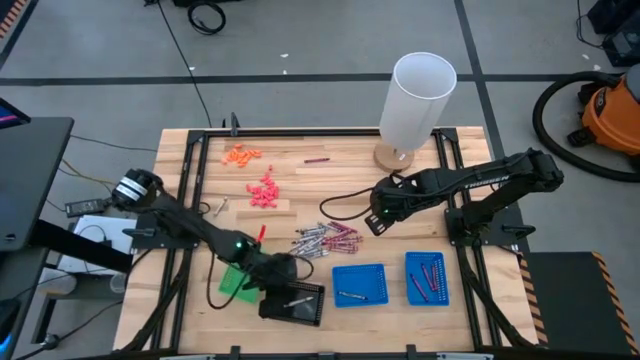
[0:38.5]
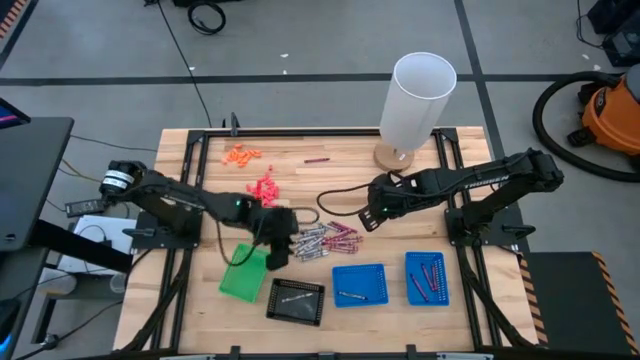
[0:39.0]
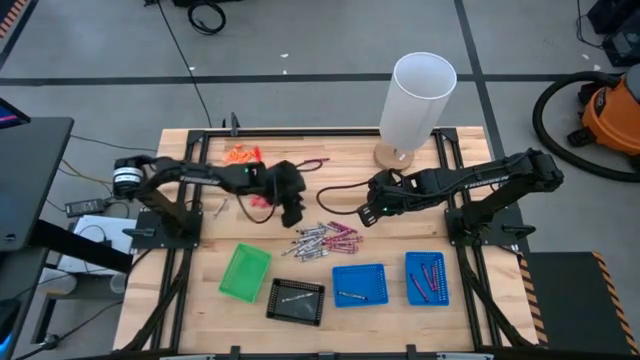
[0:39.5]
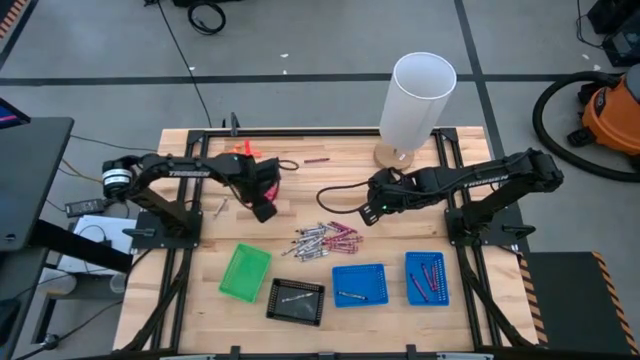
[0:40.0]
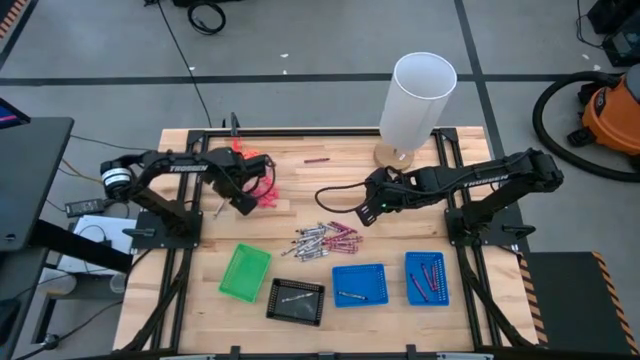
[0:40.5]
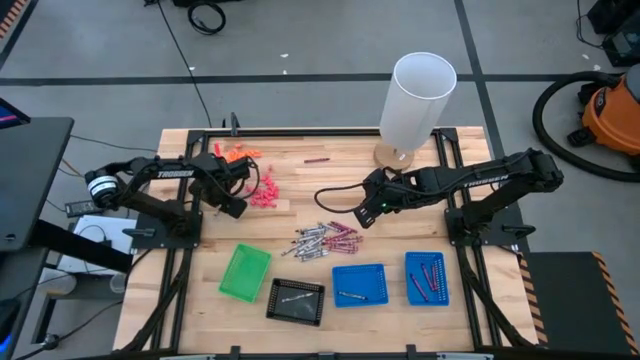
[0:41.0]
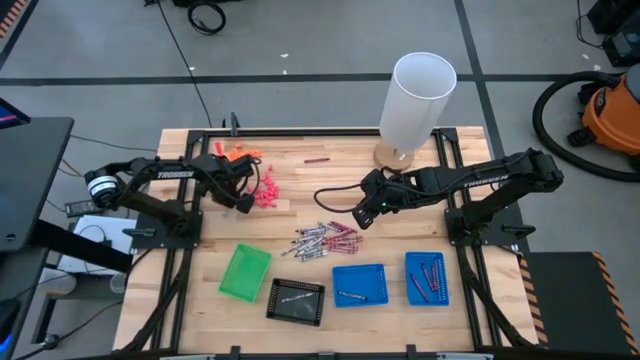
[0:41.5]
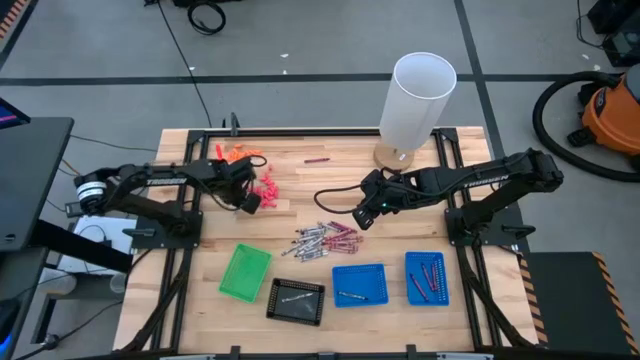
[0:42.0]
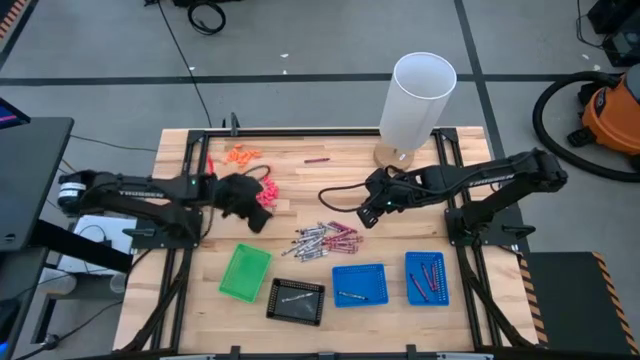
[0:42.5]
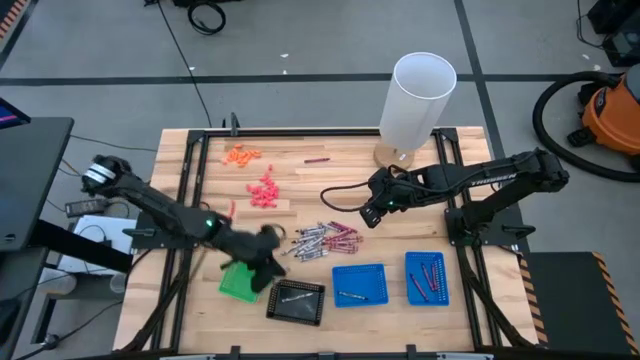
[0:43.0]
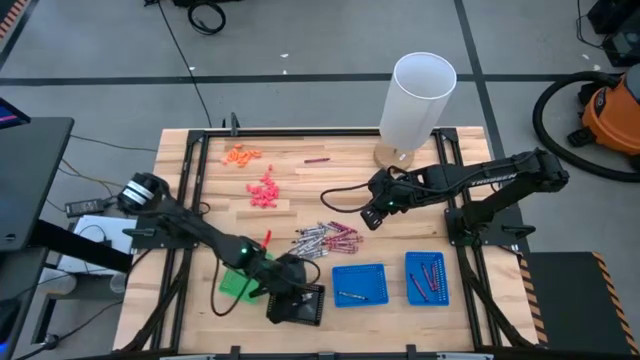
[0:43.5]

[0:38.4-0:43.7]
Task: Sort crayons
Put the white crayon into the black basket

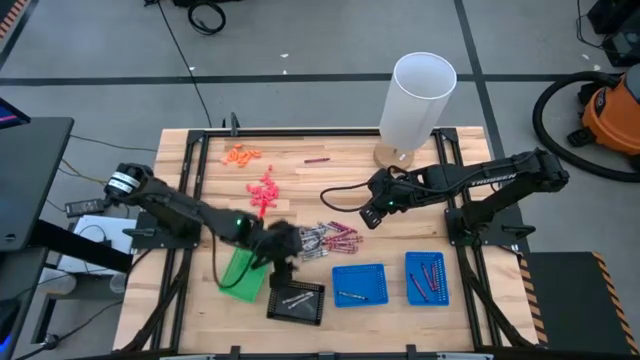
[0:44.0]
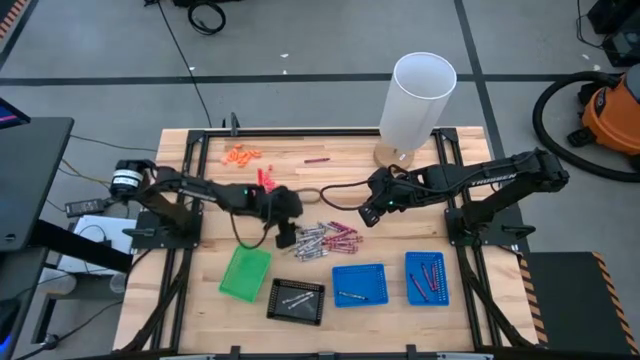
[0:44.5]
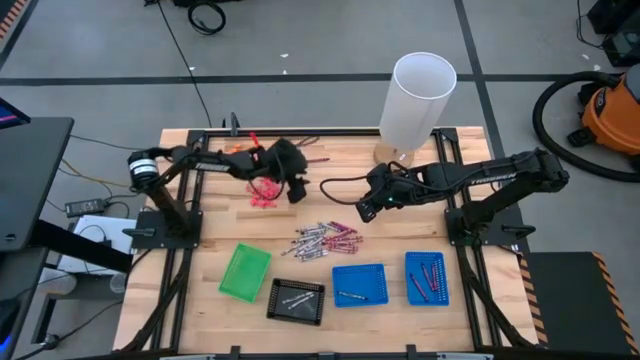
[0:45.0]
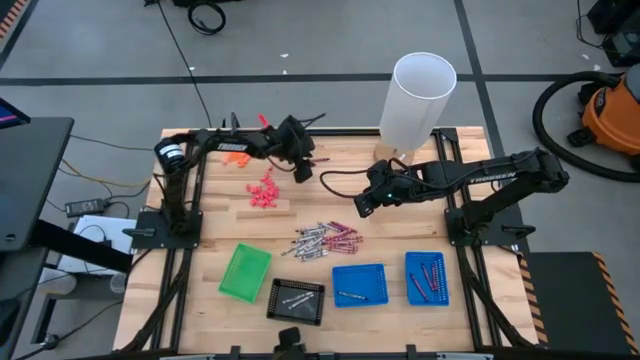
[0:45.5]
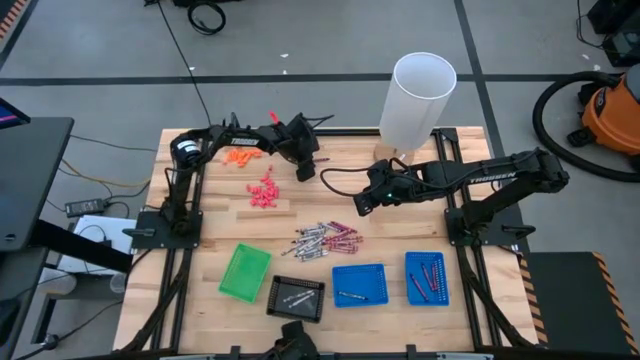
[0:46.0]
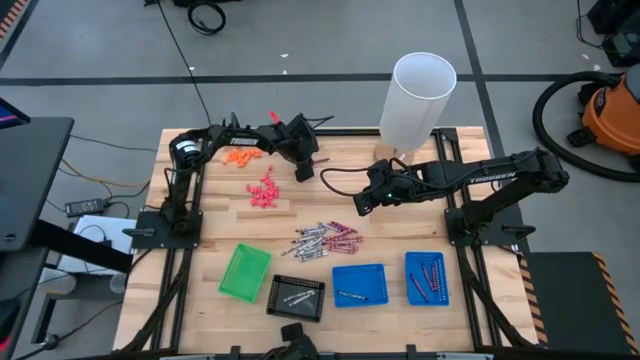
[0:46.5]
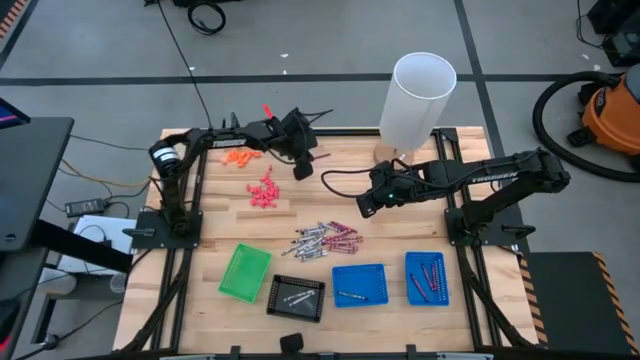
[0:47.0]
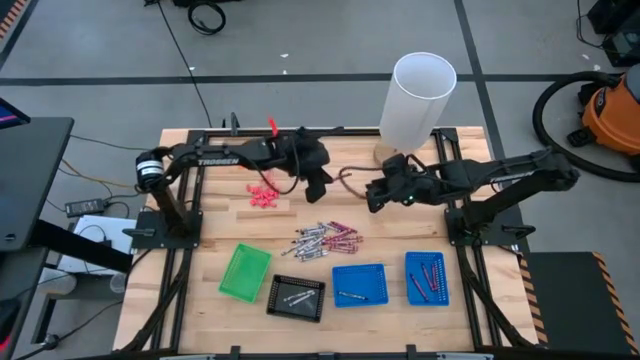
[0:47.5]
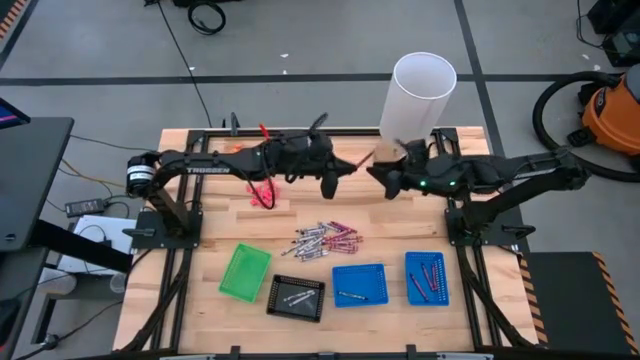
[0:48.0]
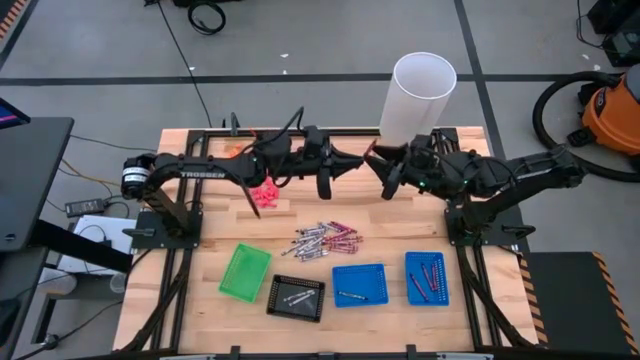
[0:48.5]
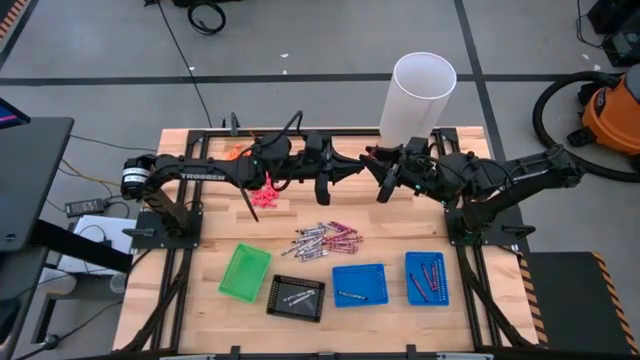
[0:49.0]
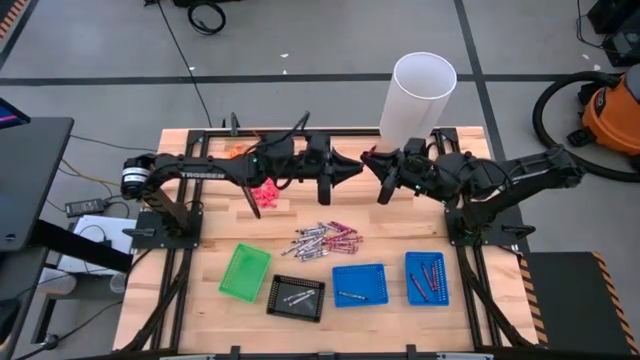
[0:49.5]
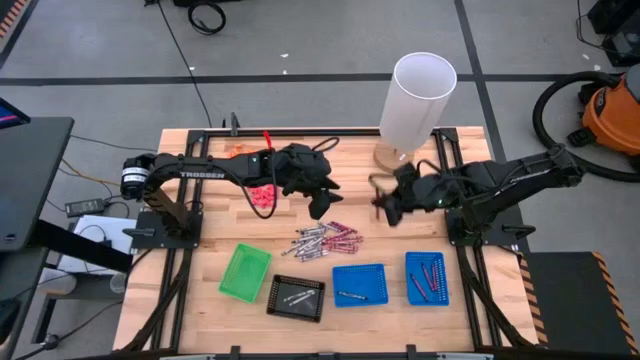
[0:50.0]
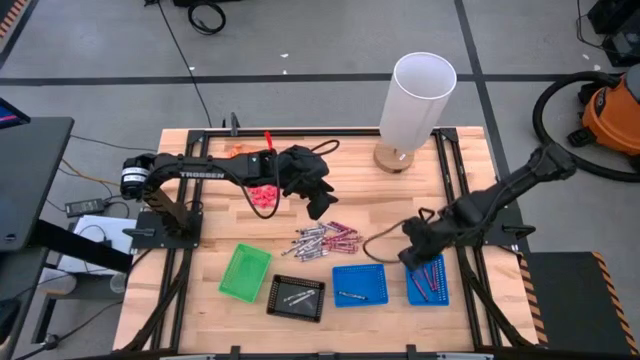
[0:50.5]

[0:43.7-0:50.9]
Put the red crayon into the right blue basket

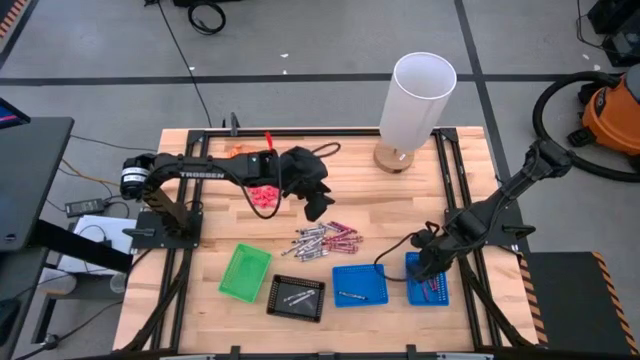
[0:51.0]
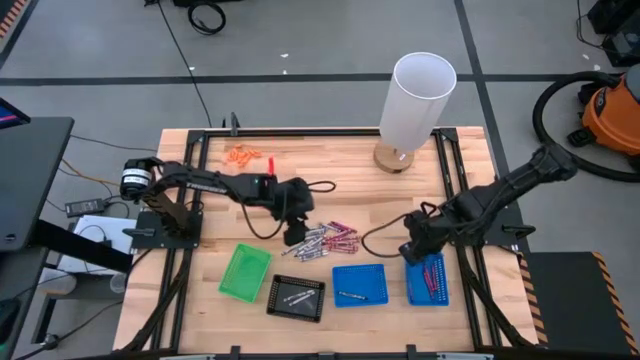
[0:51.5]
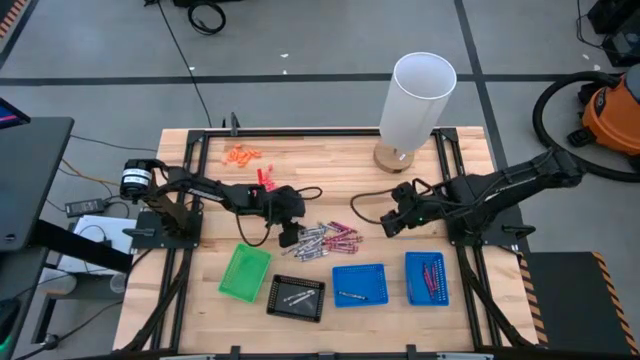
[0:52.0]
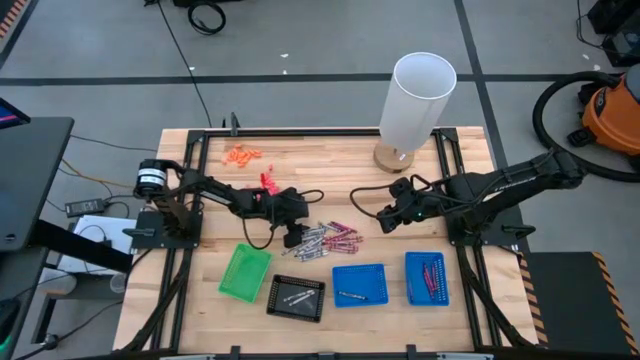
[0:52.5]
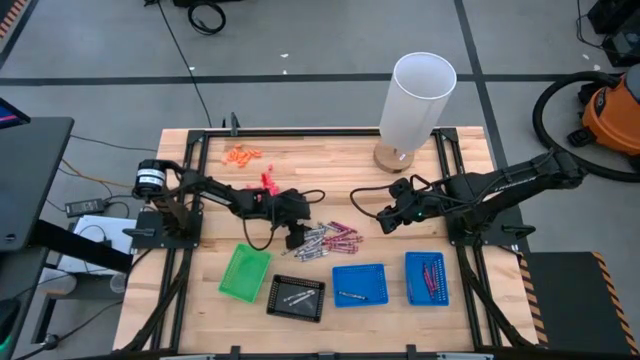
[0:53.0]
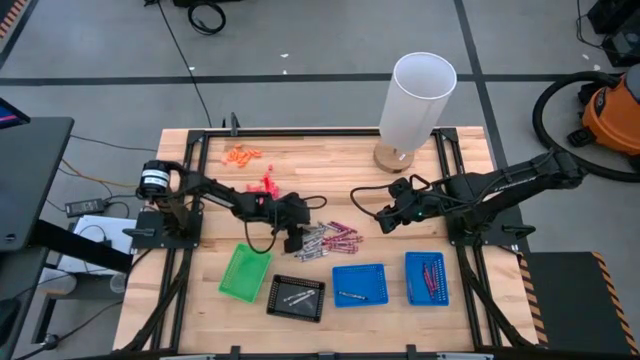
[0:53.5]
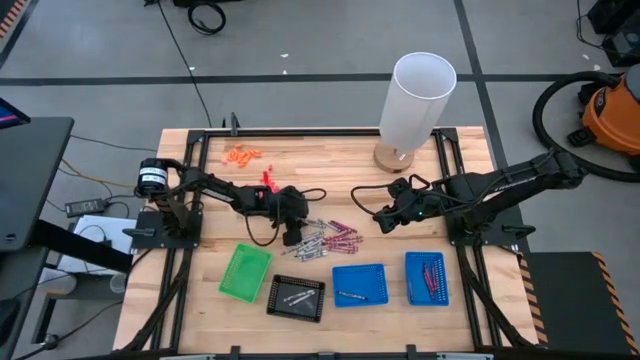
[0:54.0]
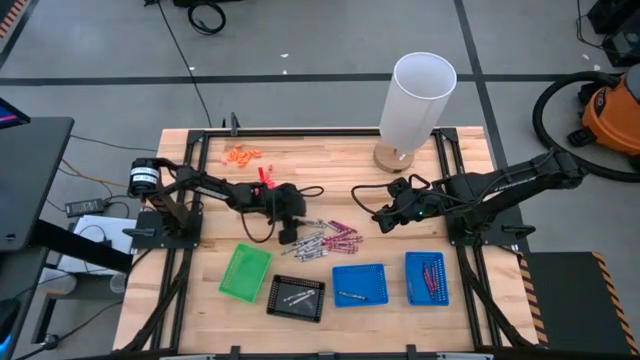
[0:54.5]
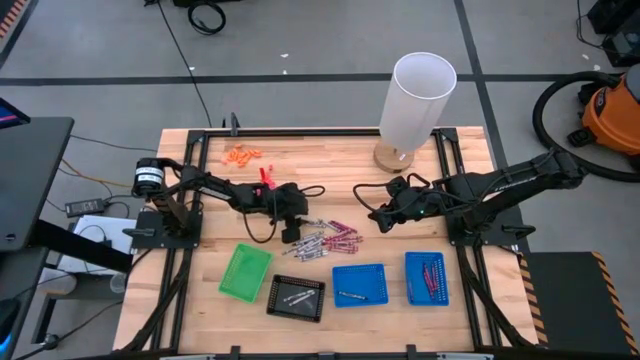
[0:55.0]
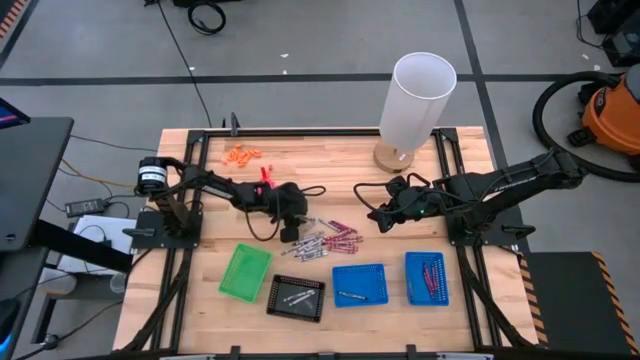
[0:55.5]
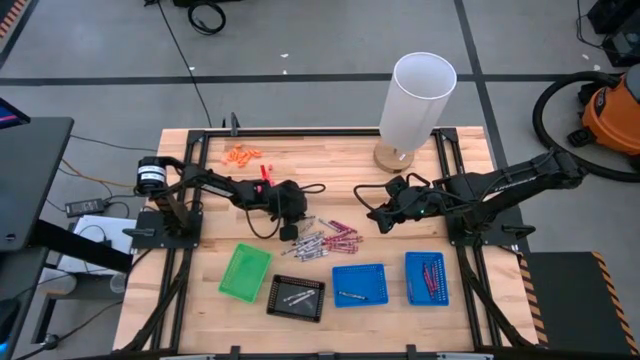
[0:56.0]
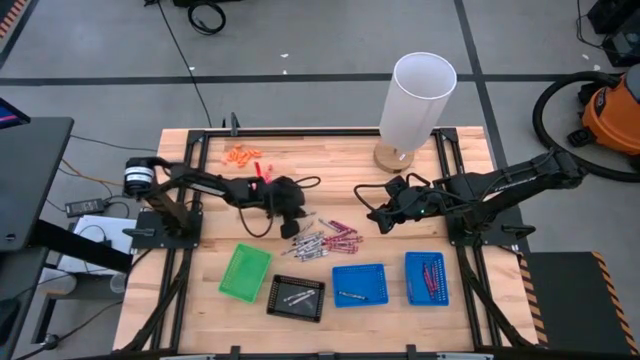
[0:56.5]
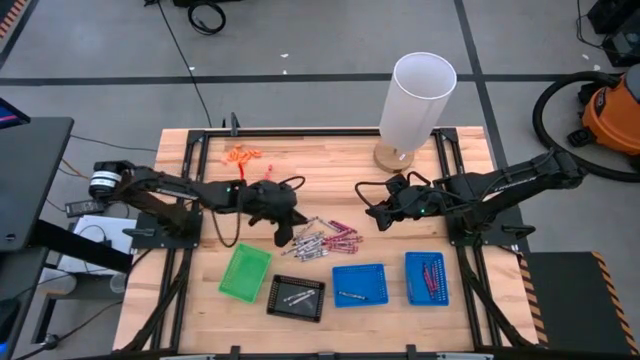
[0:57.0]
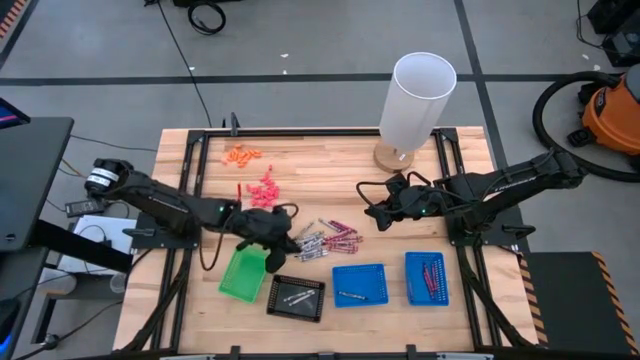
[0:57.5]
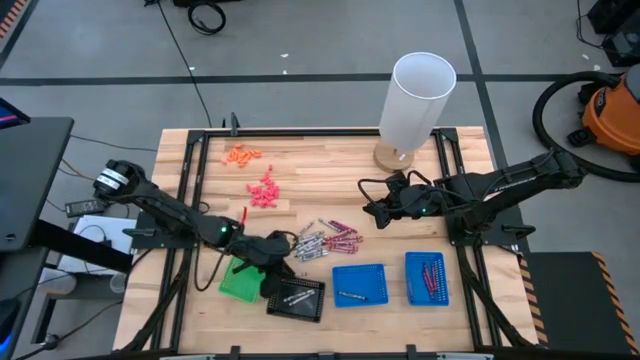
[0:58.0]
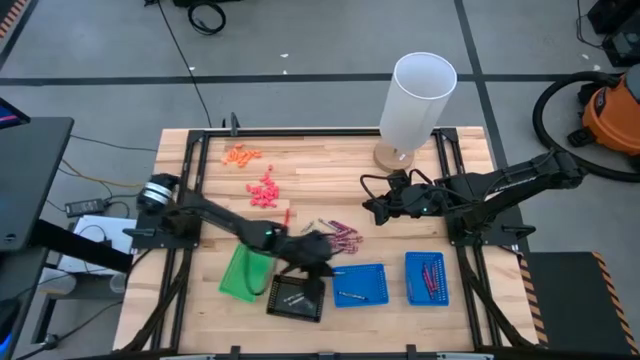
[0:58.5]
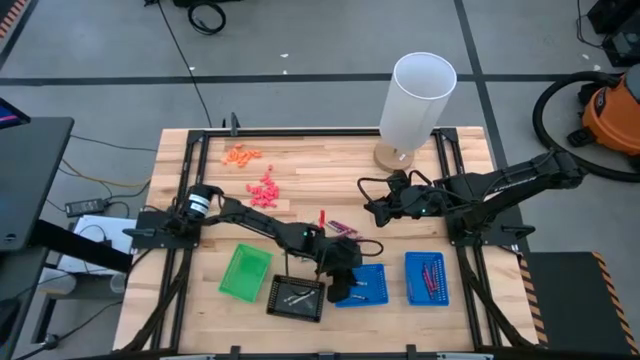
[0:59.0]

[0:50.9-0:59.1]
Put the black crayon into the left blue basket

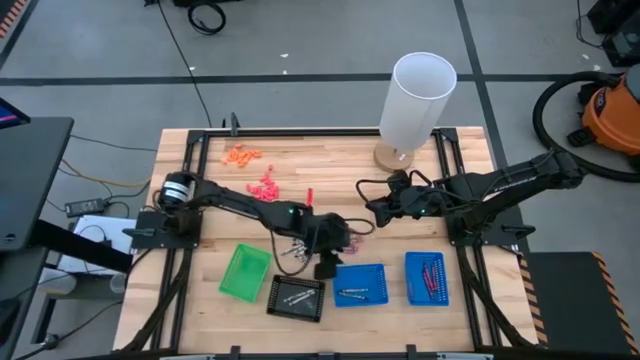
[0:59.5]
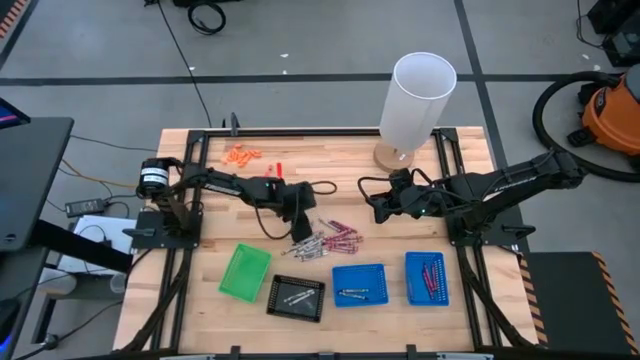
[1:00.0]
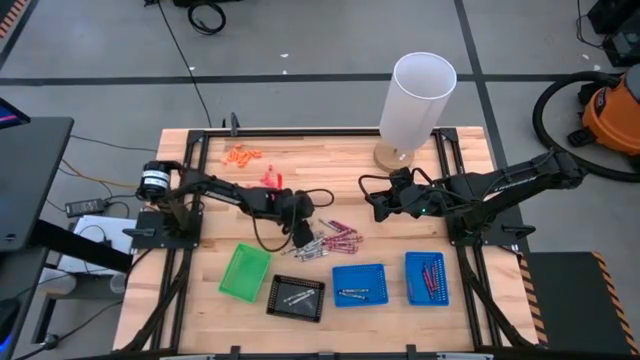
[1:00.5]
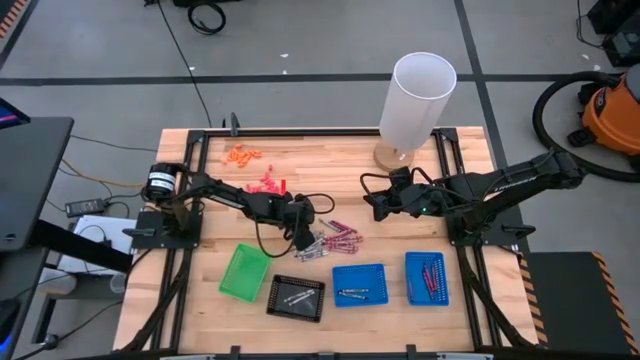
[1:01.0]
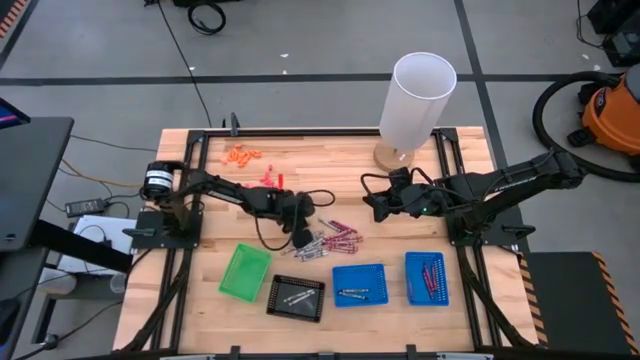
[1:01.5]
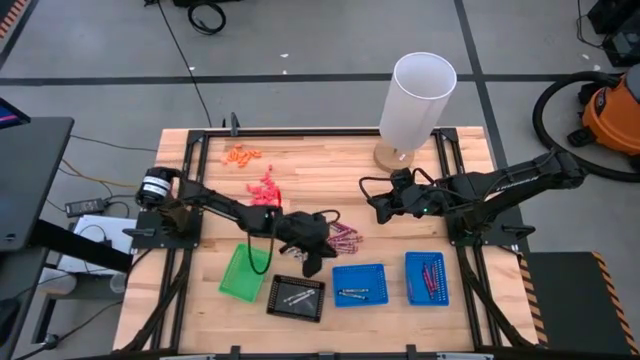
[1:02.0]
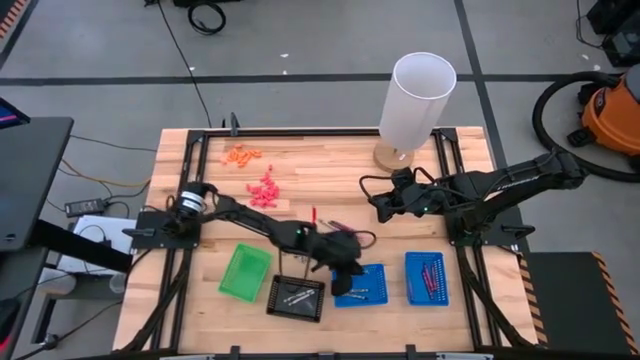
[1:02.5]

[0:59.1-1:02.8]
Put the black crayon into the left blue basket
